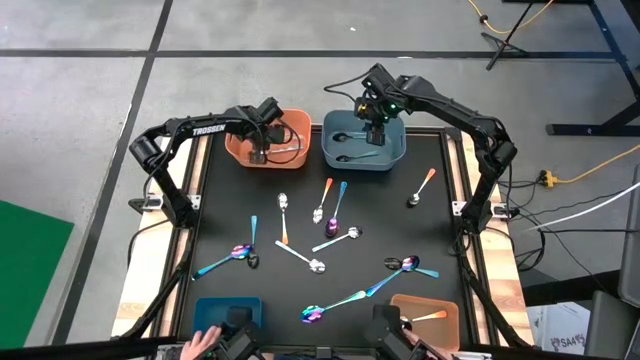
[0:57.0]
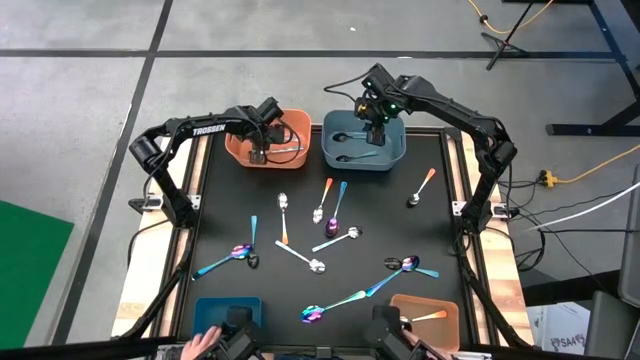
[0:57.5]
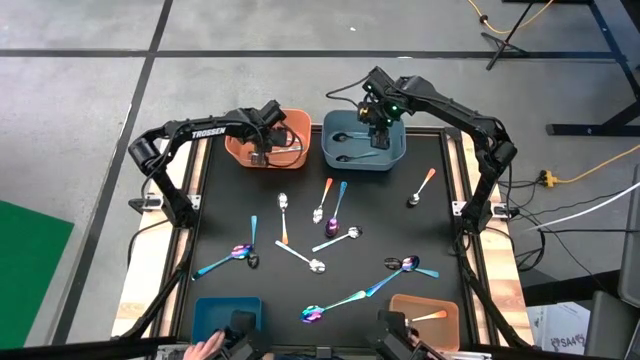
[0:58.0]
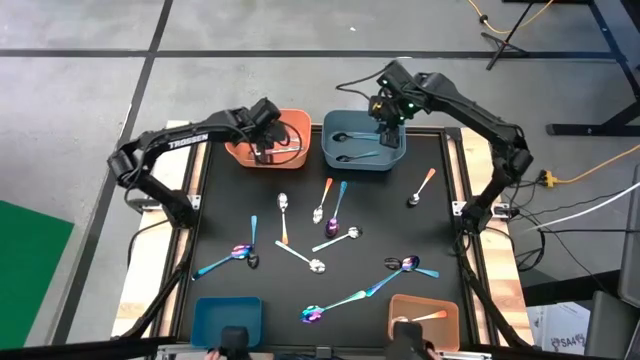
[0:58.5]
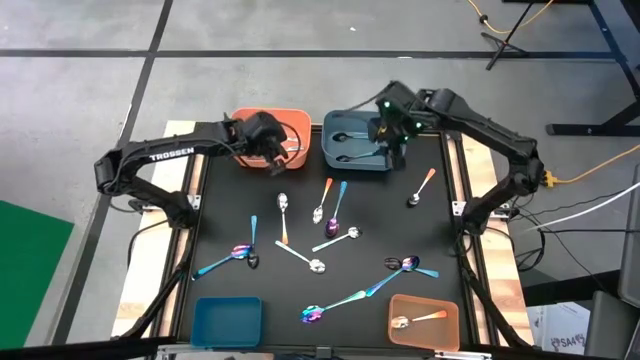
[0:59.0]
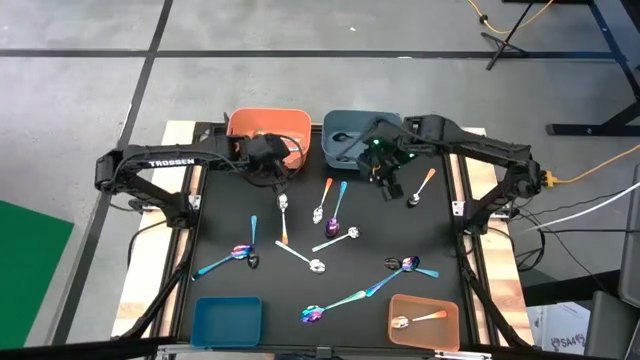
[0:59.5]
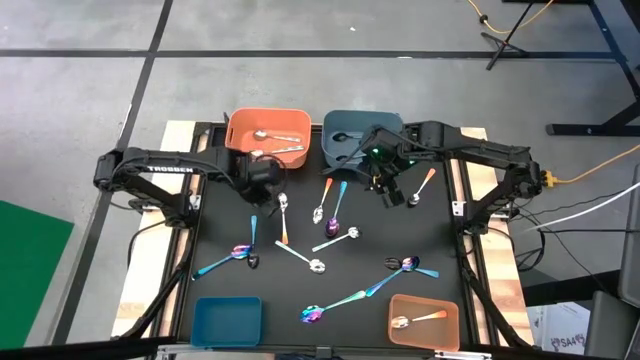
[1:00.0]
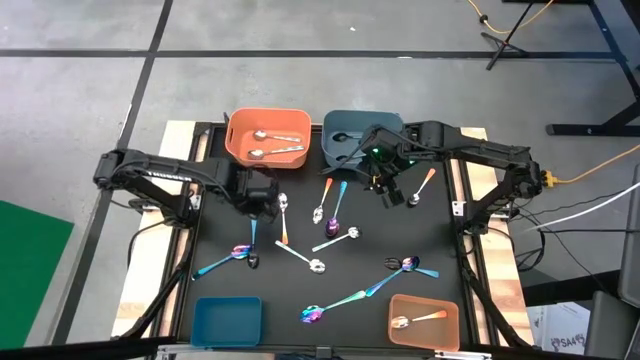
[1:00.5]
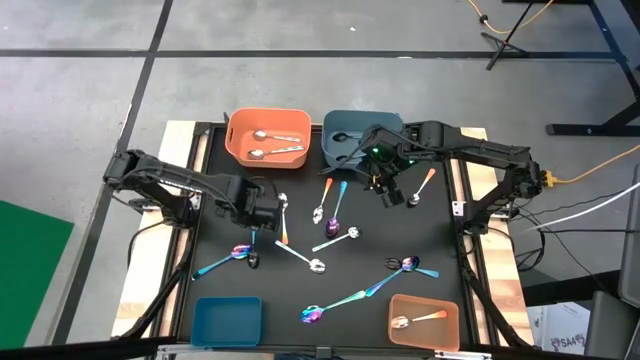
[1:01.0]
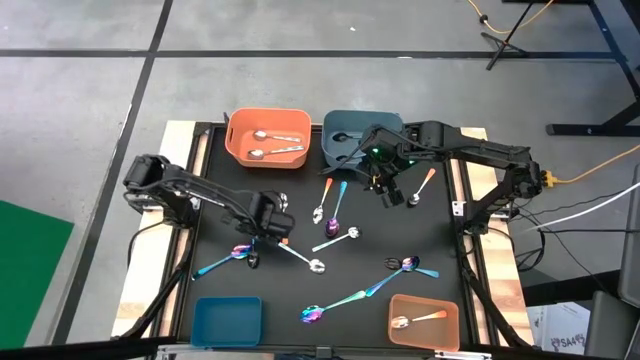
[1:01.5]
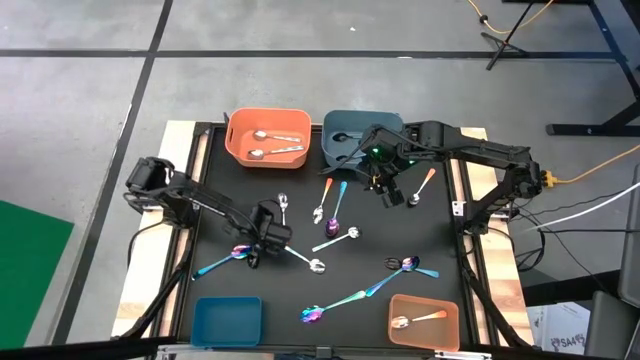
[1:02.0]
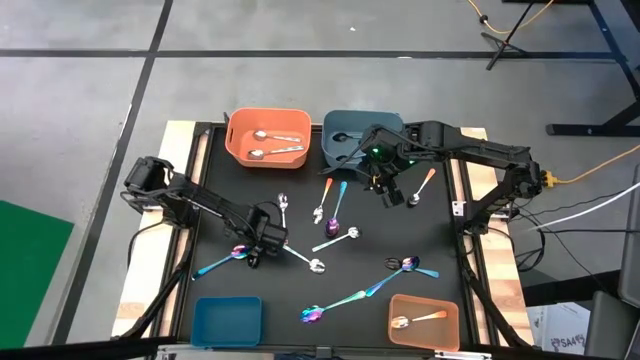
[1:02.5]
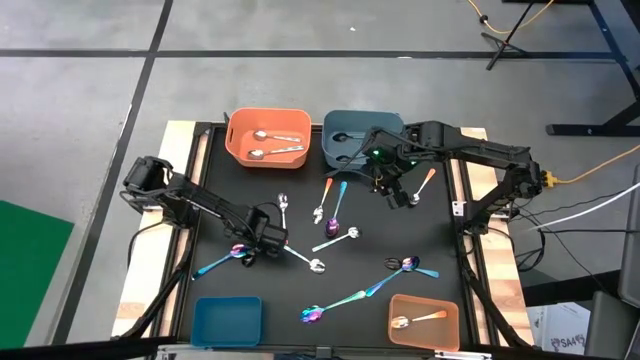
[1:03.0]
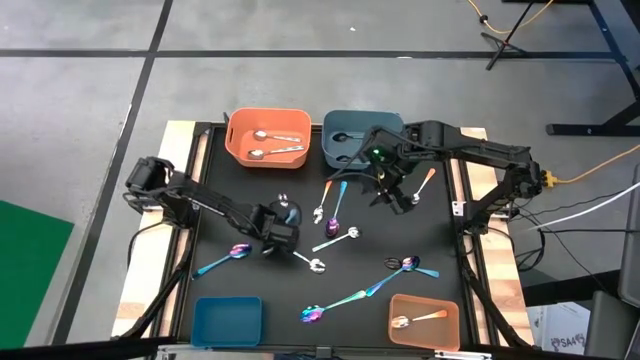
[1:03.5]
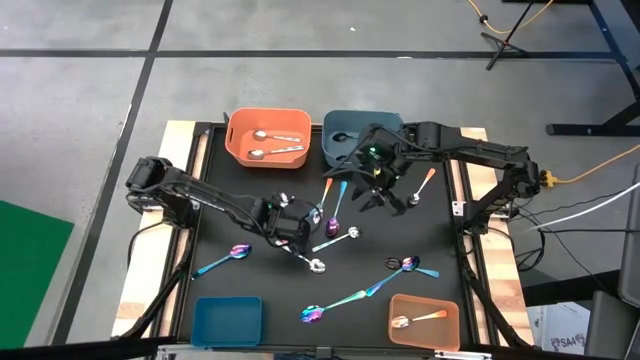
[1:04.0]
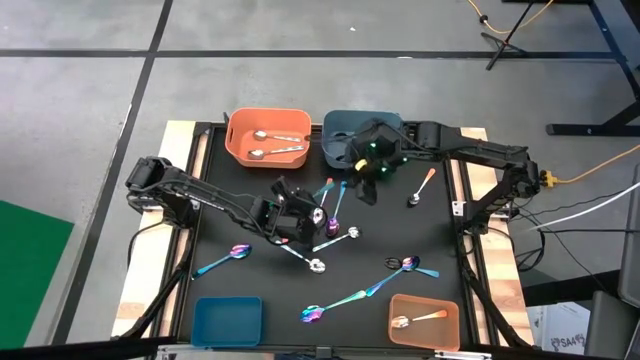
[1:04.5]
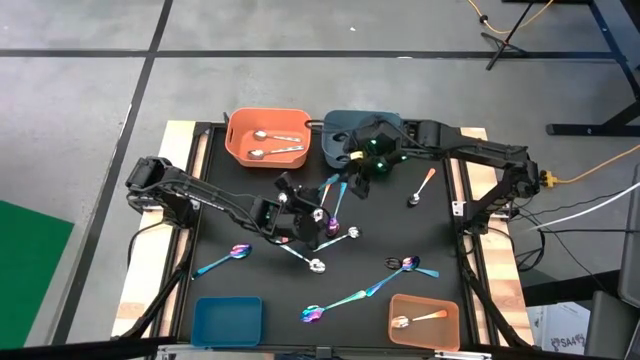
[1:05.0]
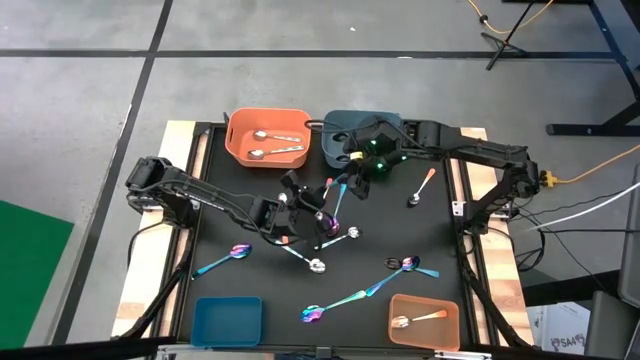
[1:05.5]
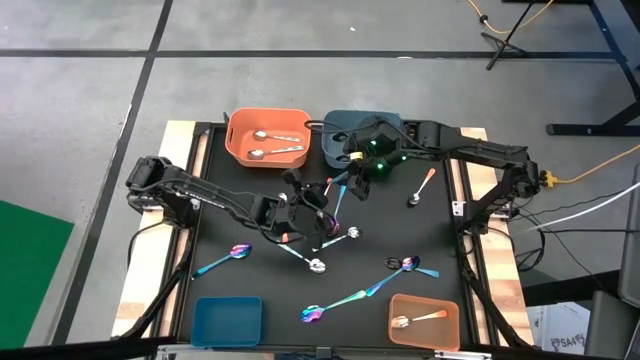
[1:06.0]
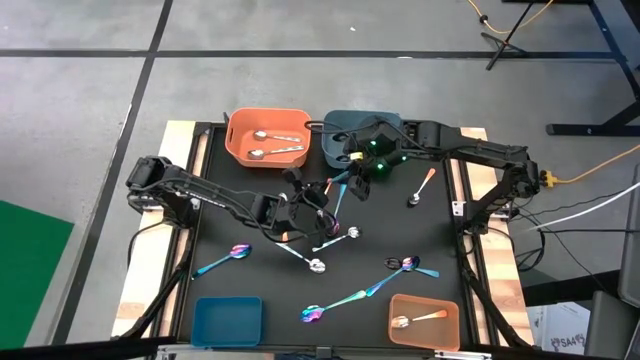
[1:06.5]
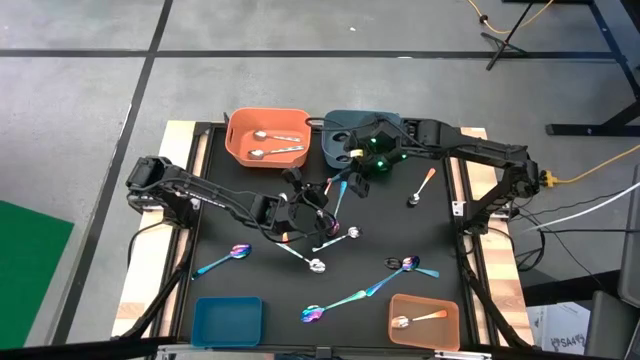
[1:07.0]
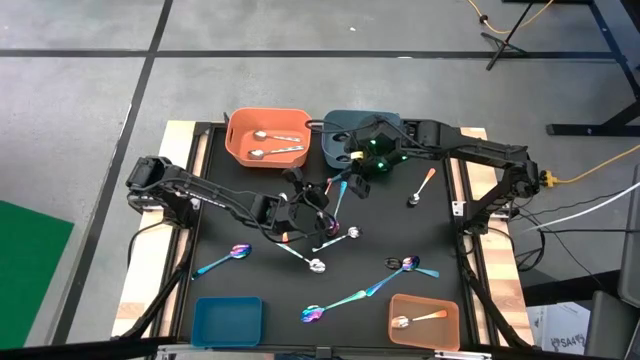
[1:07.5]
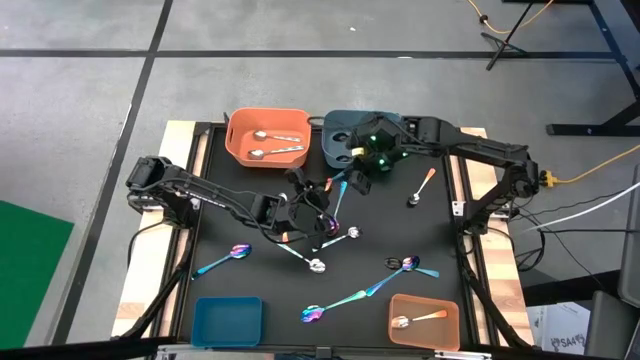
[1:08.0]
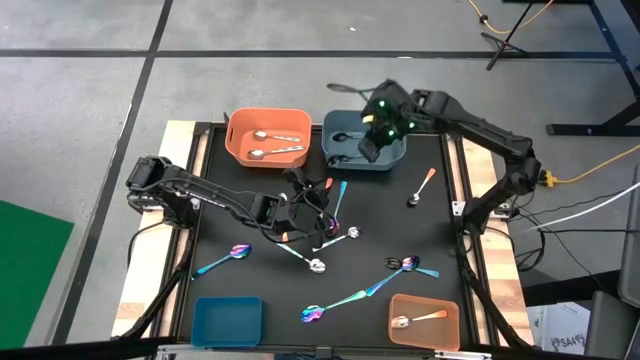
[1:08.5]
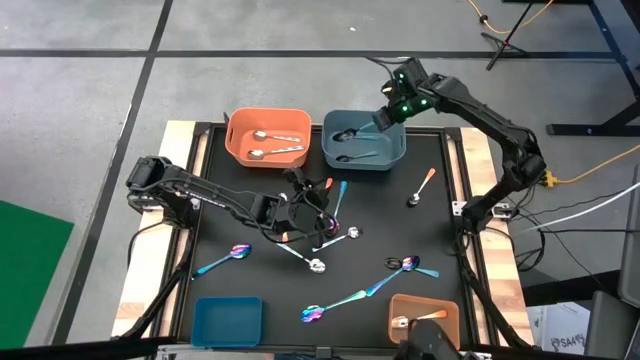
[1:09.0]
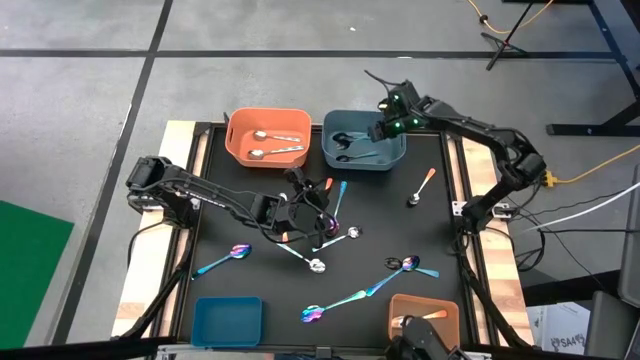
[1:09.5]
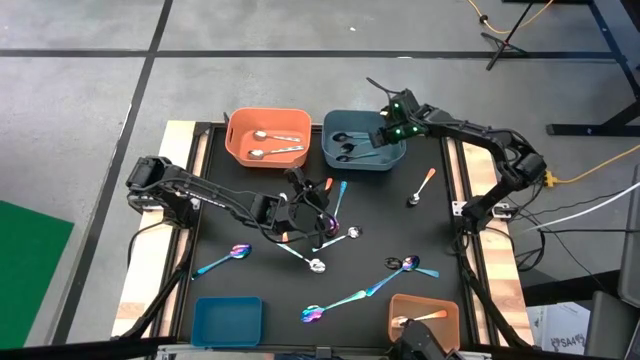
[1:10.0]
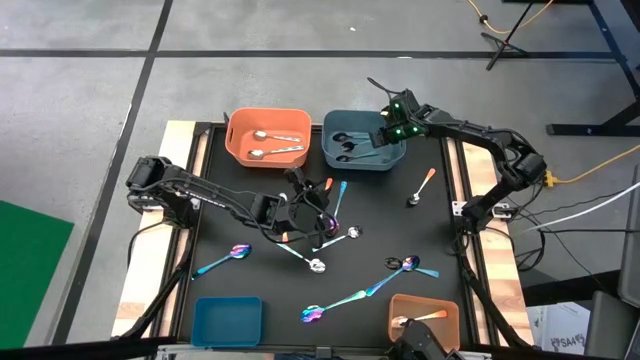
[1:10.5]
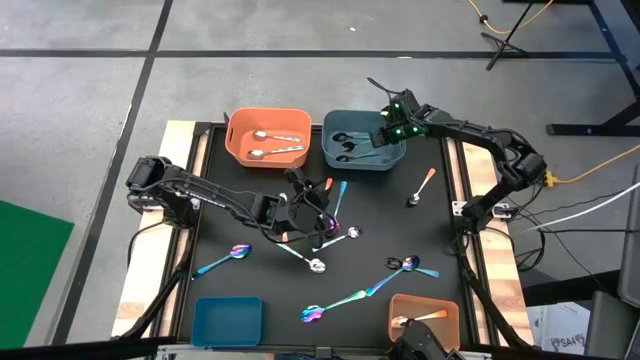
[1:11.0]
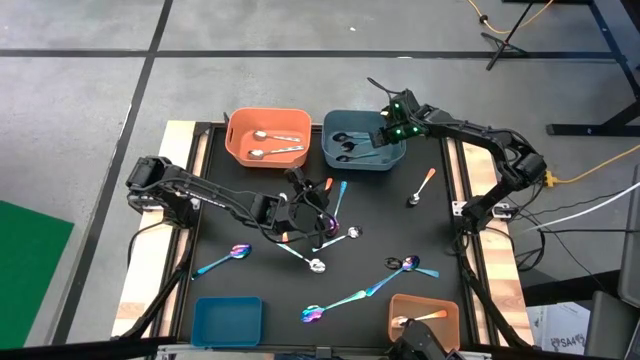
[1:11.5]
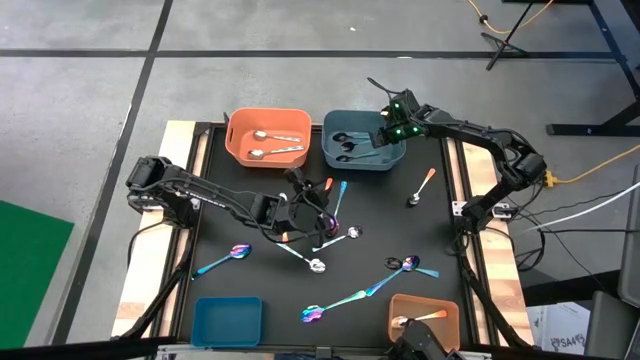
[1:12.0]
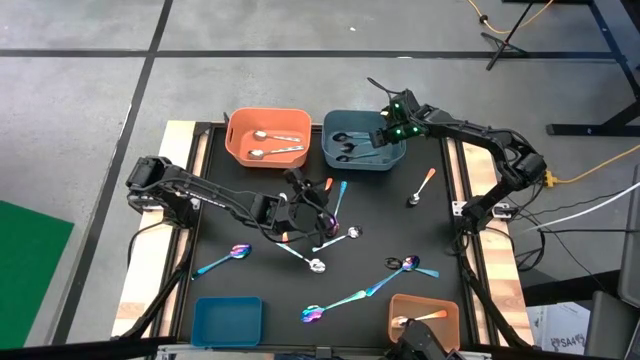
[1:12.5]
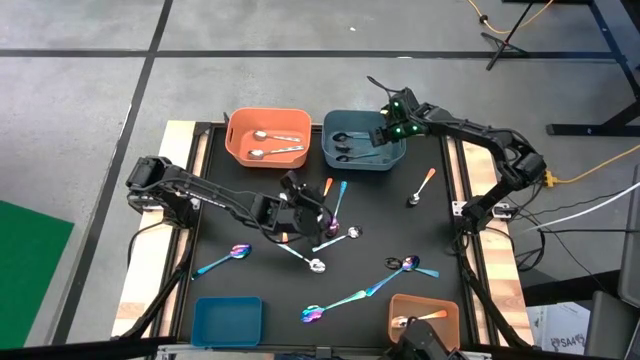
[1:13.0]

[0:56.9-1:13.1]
Task: Sort silverware by color (type)
Put the blue spoon into the top blue bin

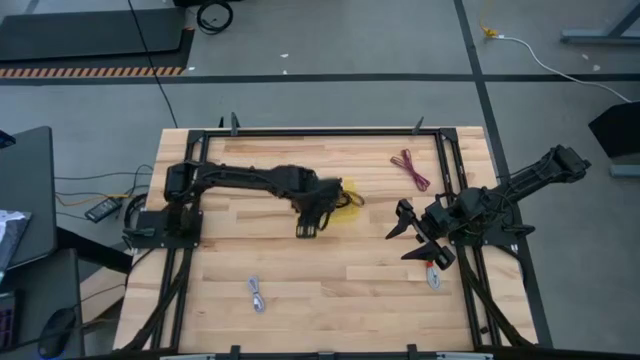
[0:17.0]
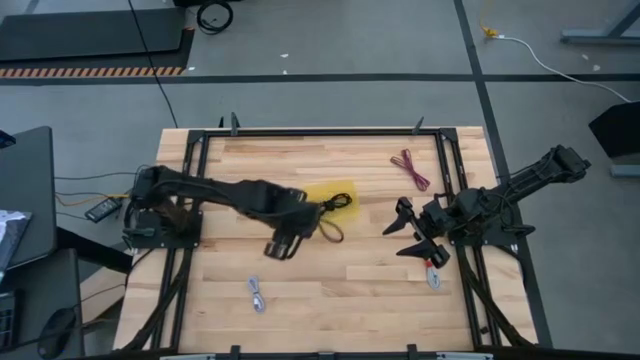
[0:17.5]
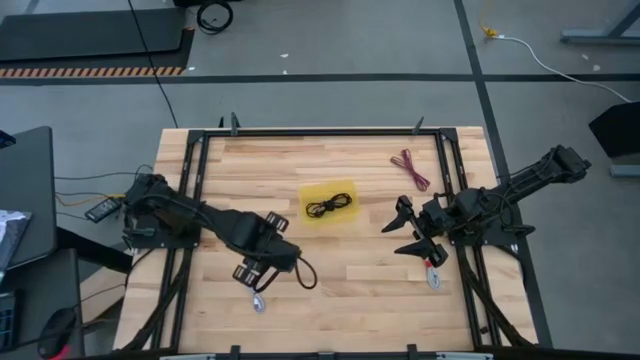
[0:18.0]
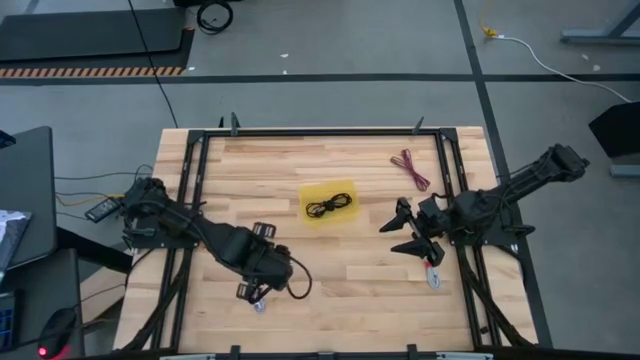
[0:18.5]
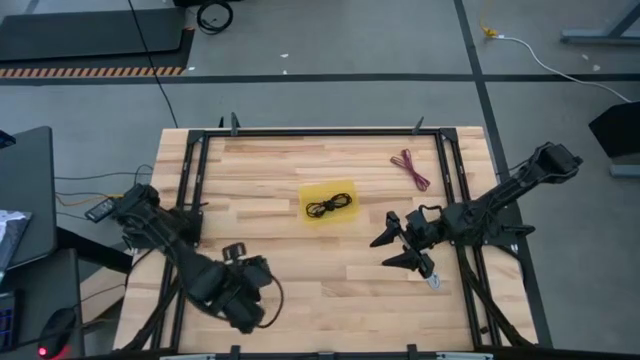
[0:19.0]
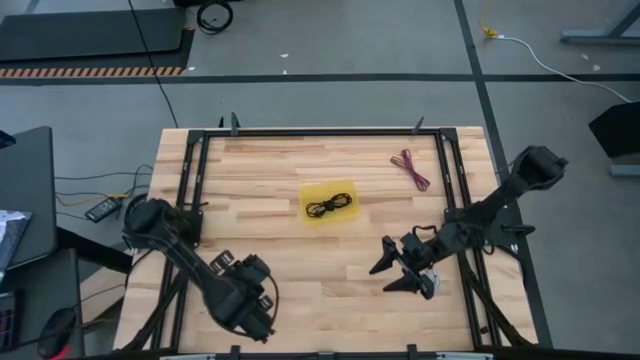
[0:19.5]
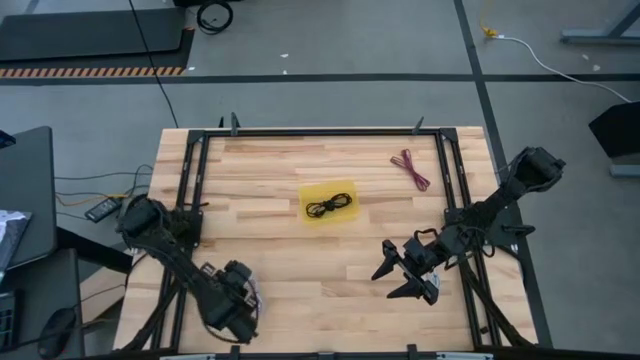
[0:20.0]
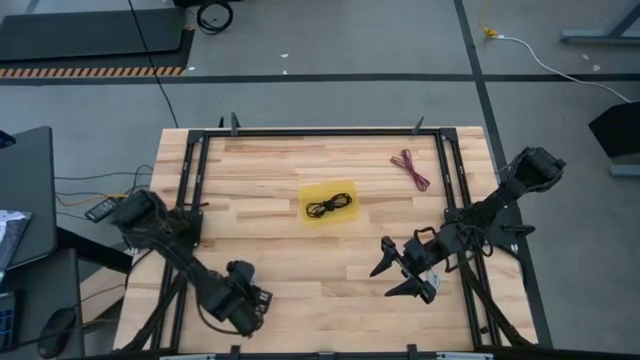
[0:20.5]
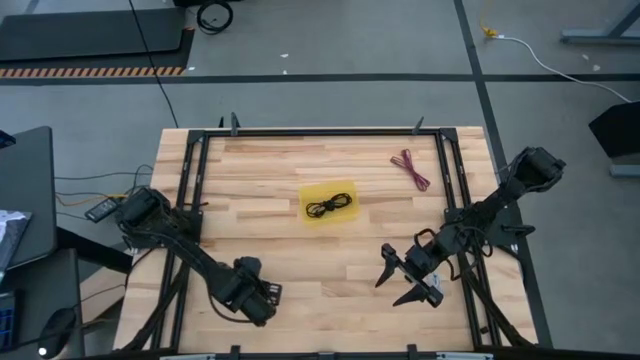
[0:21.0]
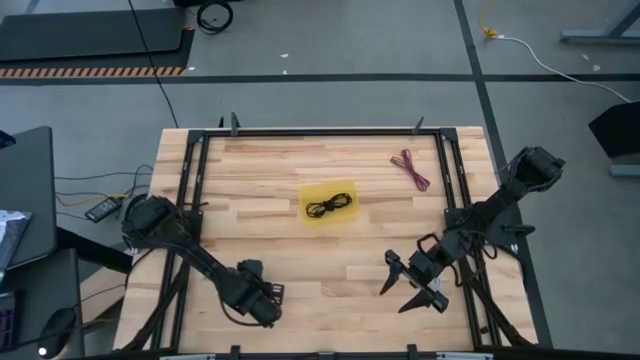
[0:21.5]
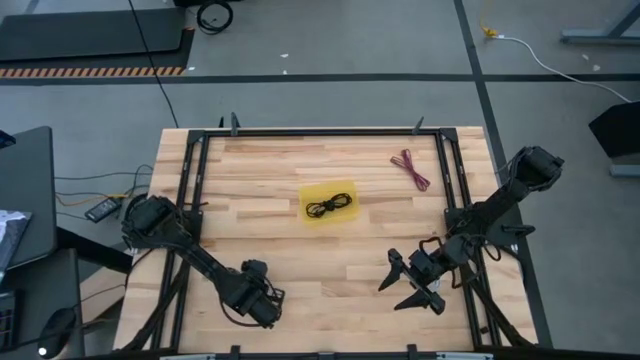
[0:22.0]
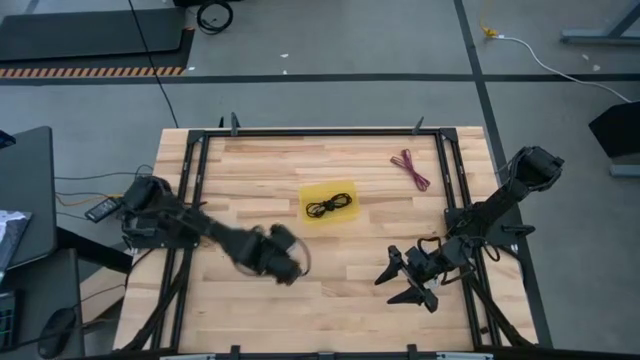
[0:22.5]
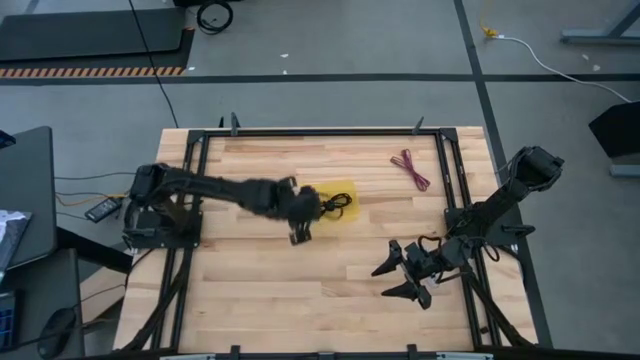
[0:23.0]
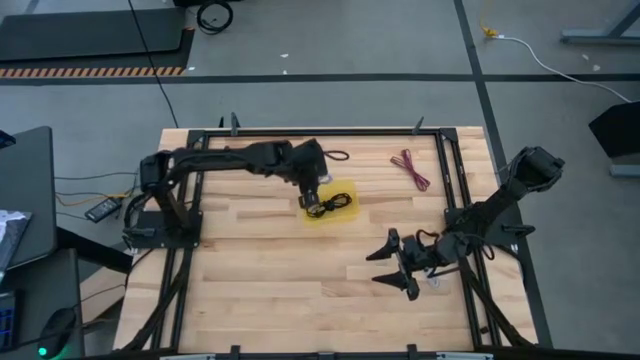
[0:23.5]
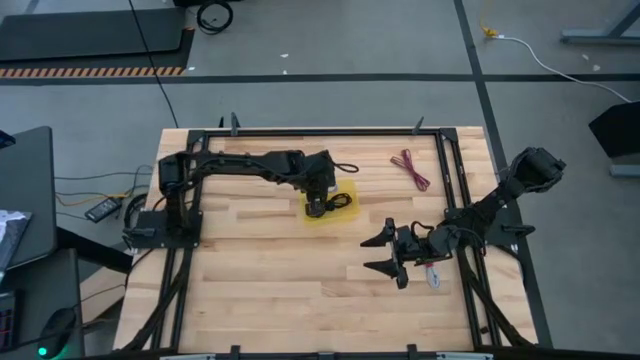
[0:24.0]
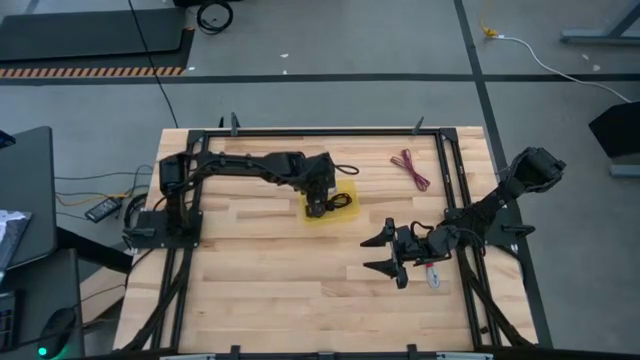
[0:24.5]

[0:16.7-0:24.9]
Task: Pick and place USB-C Cables
Put the left white cable charger into the yellow bin
